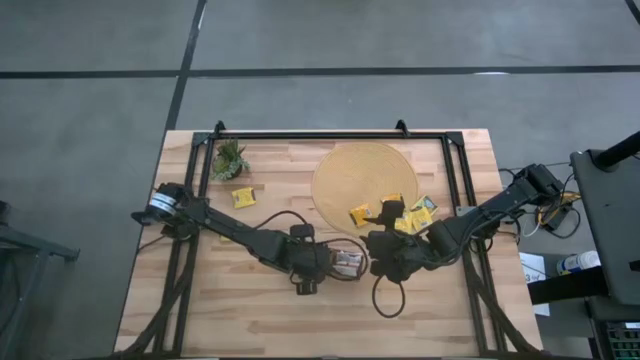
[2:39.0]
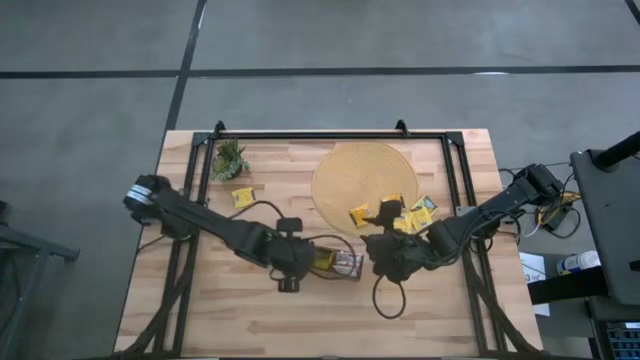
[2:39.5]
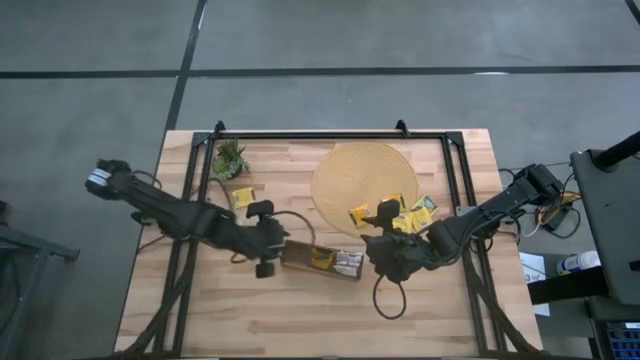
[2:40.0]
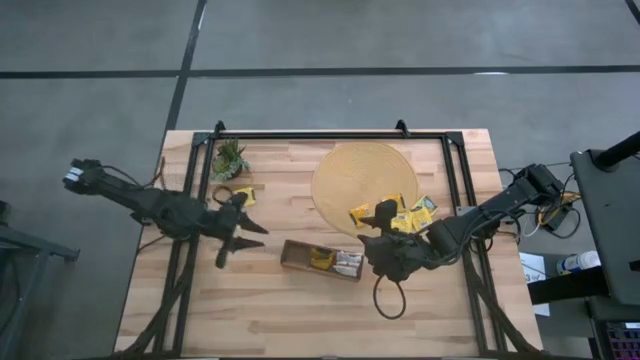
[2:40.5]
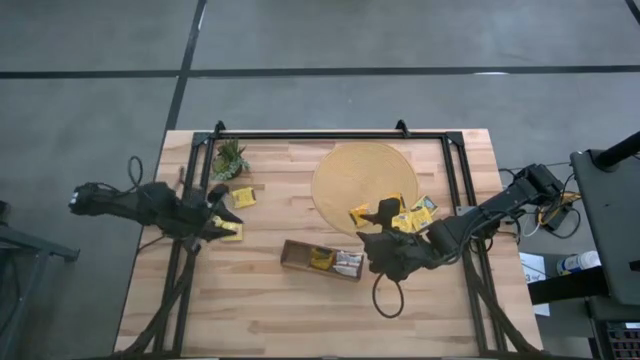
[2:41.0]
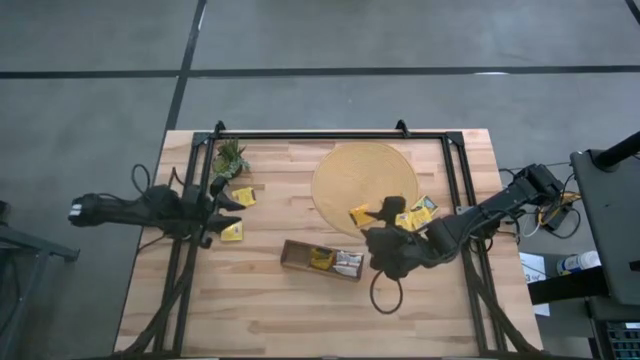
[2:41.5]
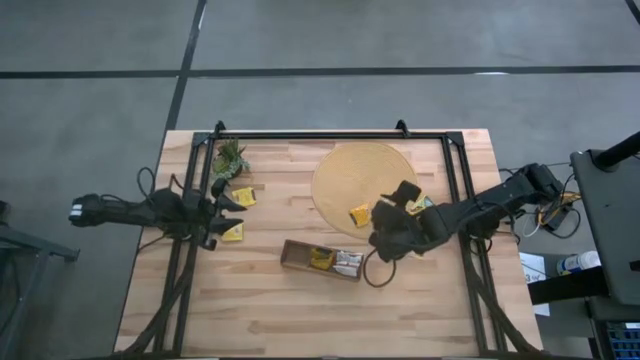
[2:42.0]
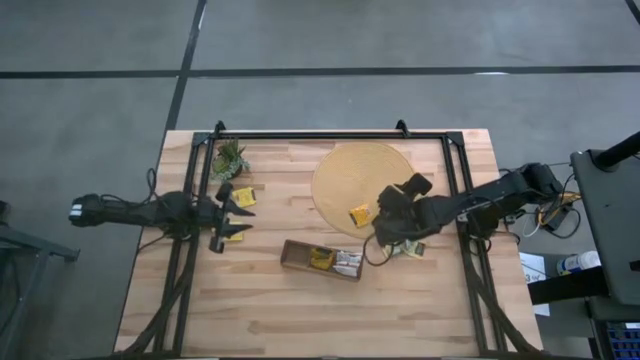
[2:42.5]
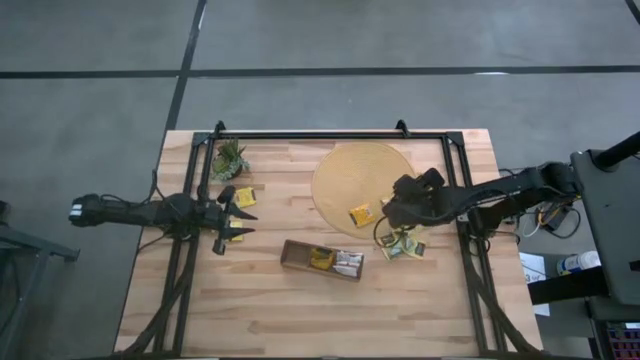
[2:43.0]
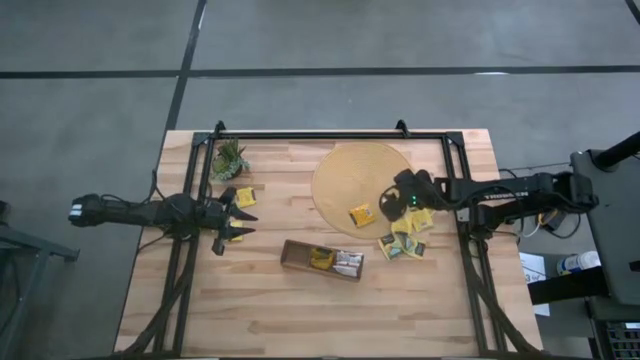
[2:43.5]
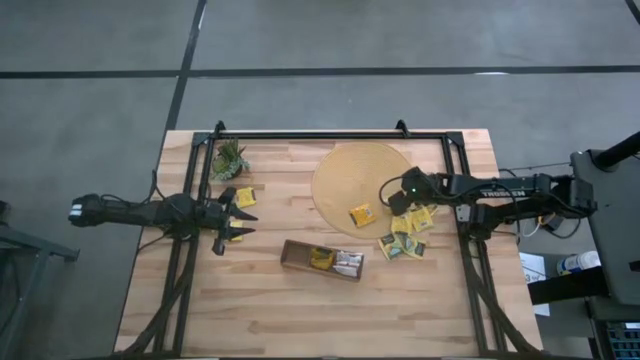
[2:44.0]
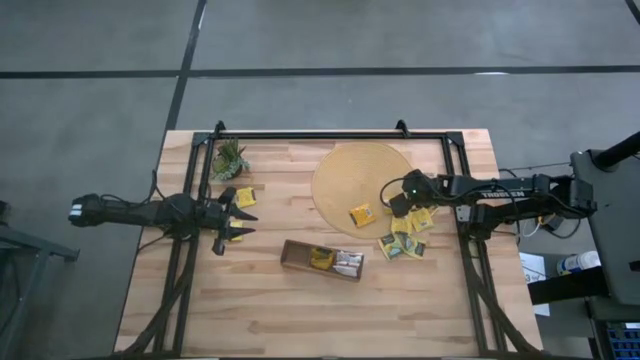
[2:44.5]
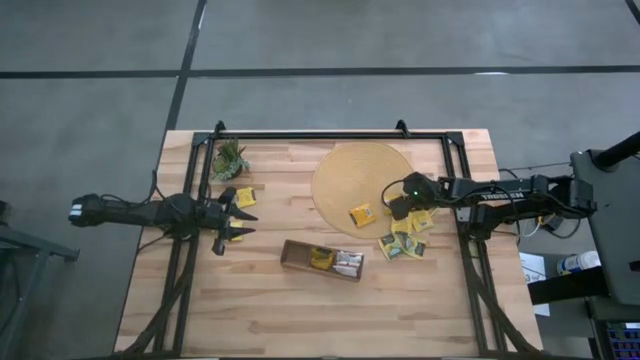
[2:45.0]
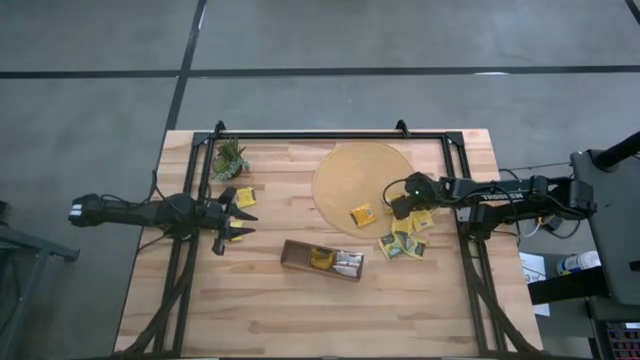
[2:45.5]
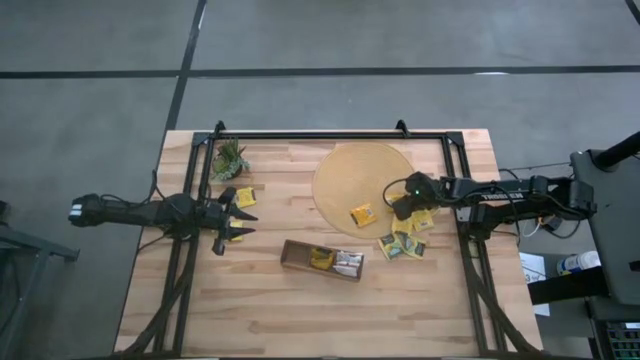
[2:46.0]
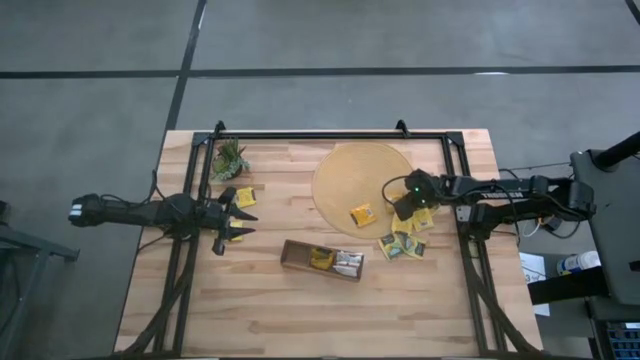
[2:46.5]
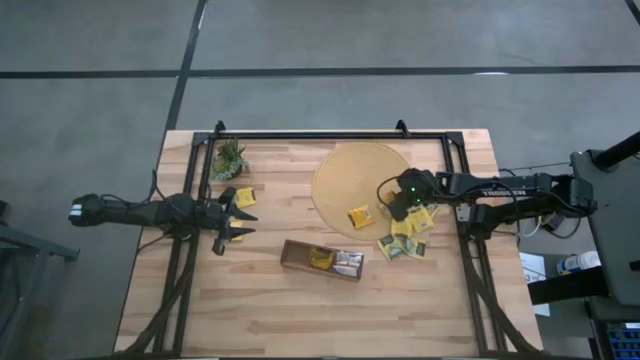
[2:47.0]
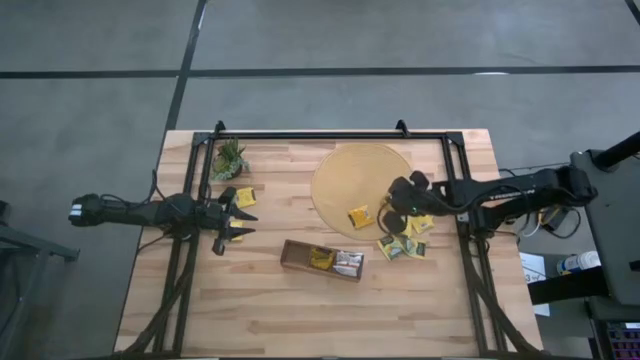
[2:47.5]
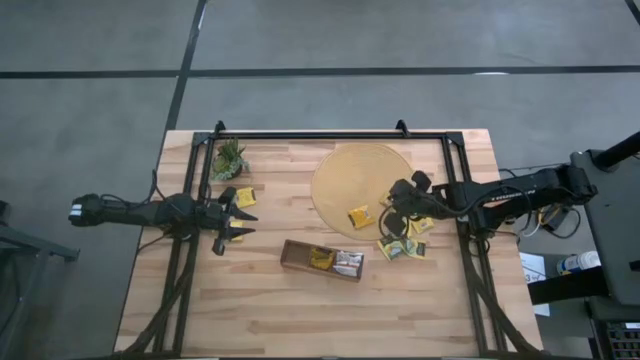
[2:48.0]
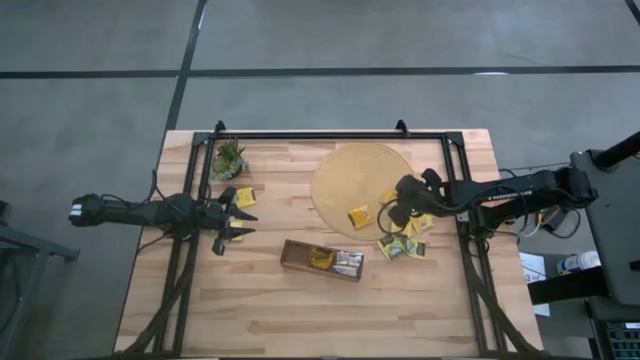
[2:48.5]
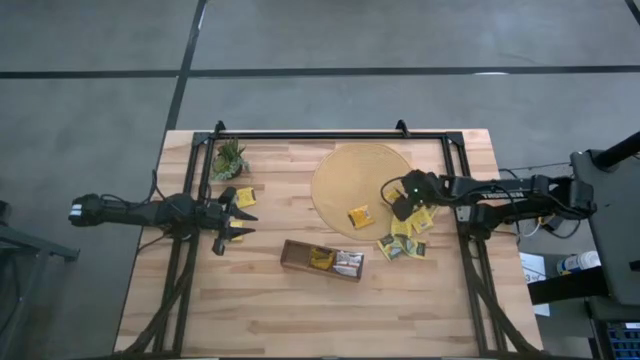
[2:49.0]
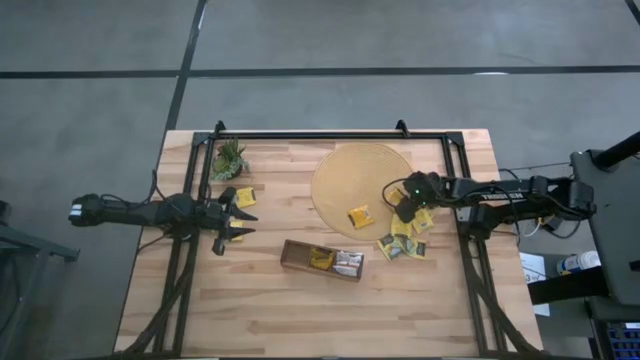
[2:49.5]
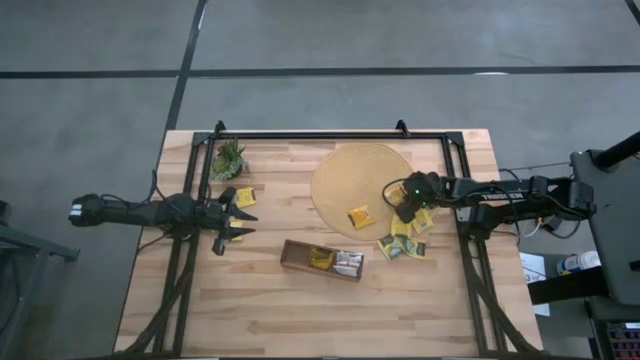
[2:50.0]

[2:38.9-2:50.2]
Task: Pick & Place Tea
Put the orange tea bag into the middle section of the wooden organizer
